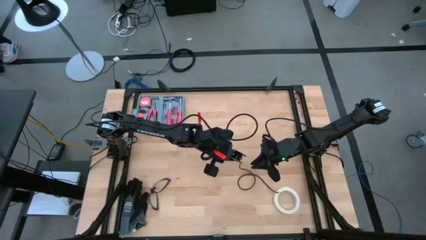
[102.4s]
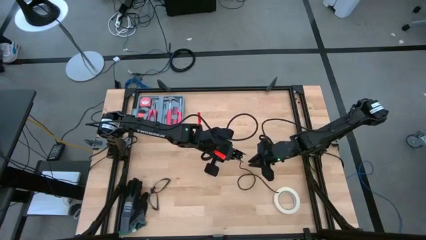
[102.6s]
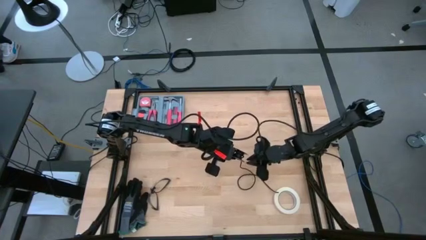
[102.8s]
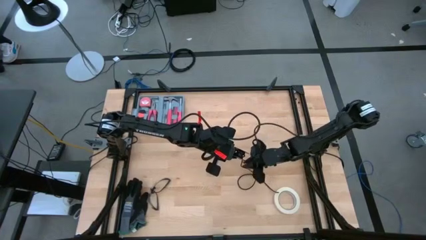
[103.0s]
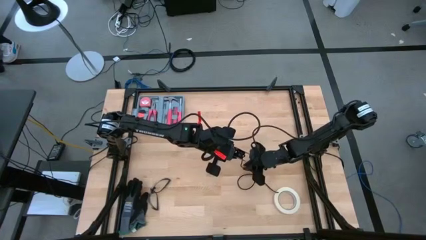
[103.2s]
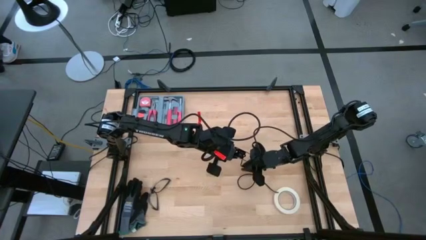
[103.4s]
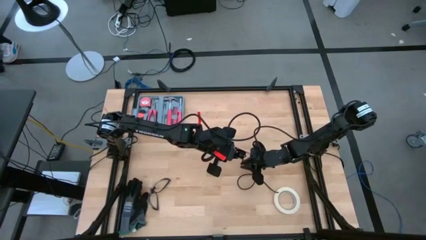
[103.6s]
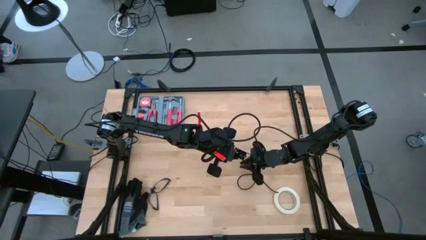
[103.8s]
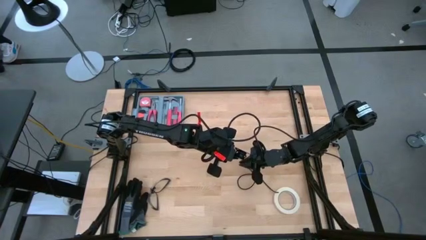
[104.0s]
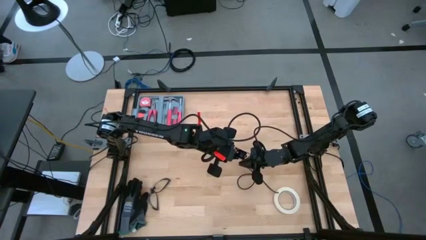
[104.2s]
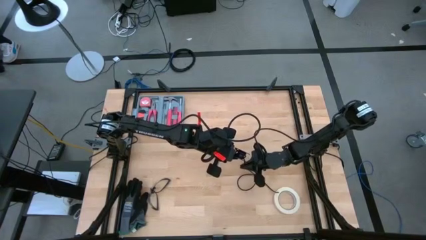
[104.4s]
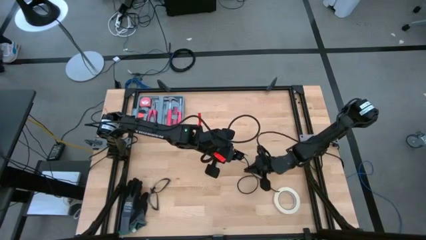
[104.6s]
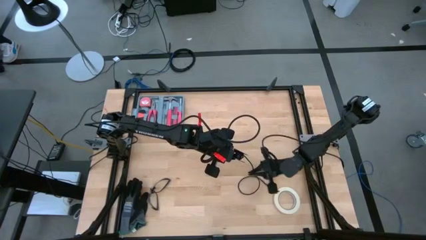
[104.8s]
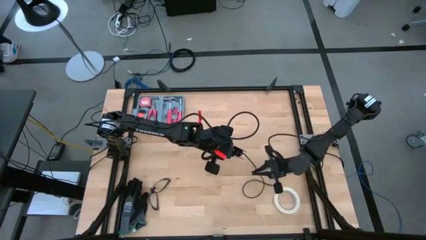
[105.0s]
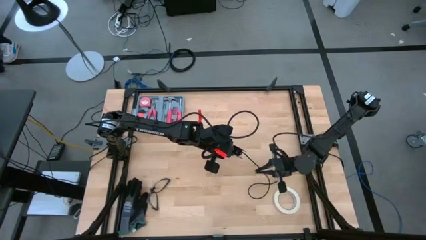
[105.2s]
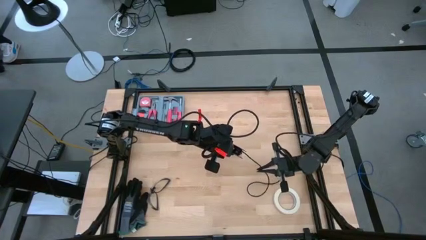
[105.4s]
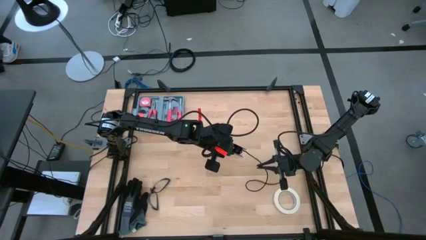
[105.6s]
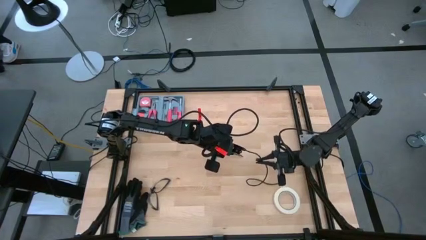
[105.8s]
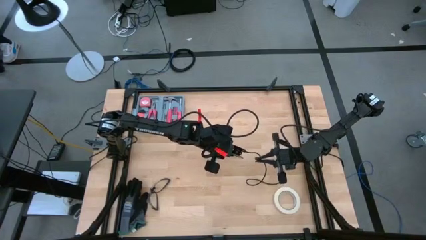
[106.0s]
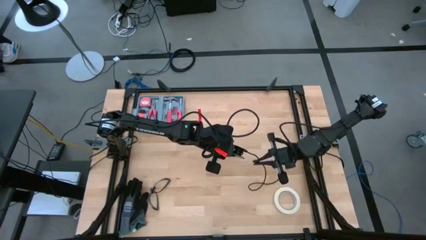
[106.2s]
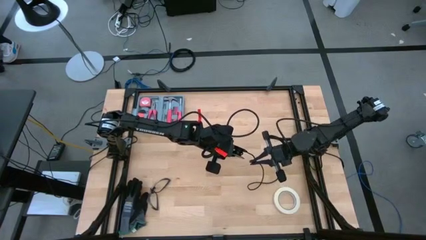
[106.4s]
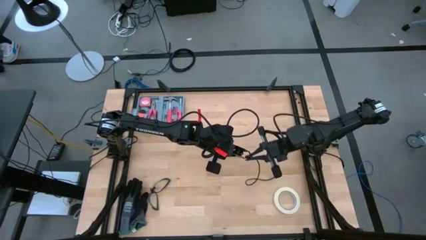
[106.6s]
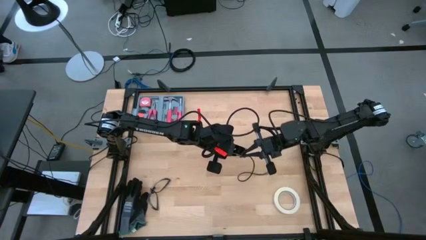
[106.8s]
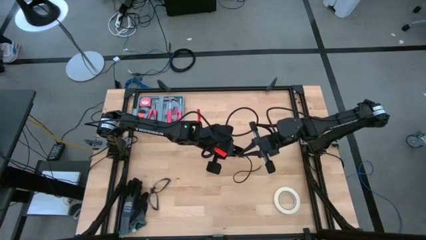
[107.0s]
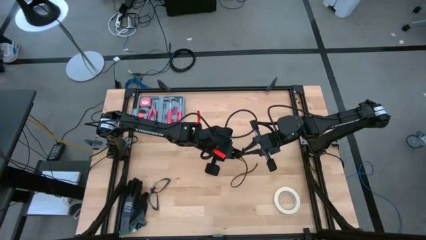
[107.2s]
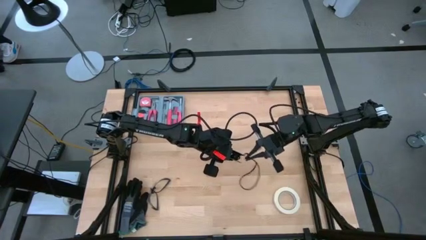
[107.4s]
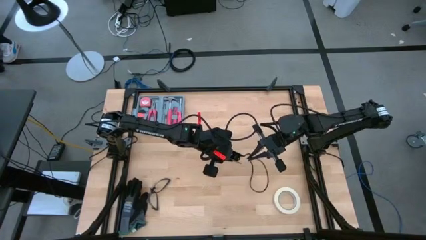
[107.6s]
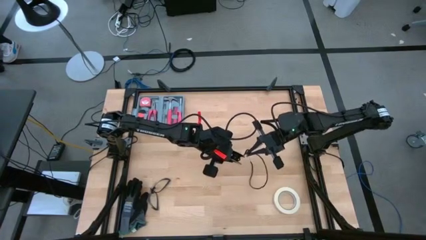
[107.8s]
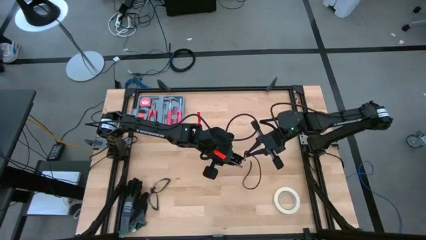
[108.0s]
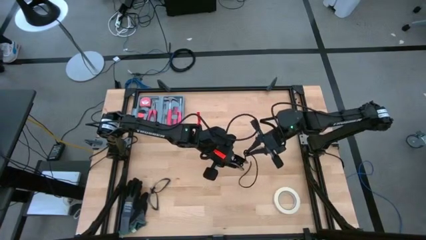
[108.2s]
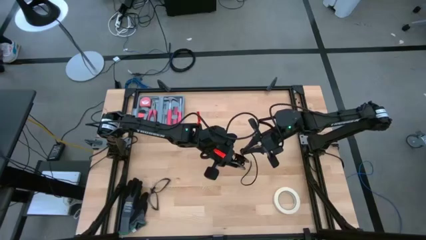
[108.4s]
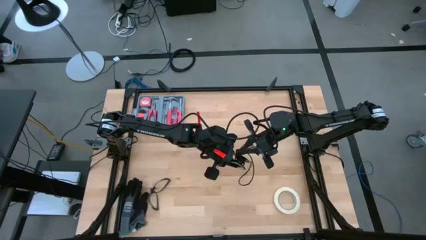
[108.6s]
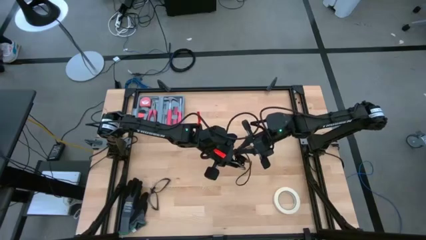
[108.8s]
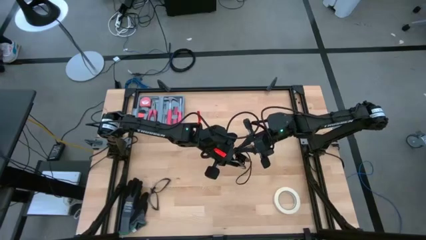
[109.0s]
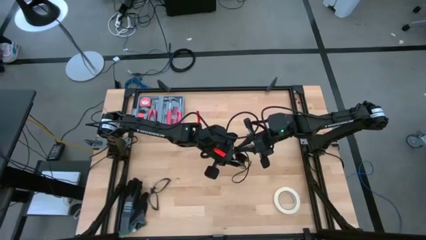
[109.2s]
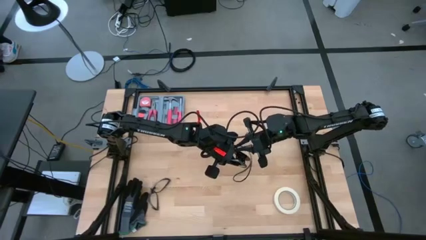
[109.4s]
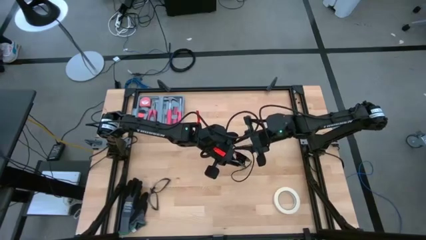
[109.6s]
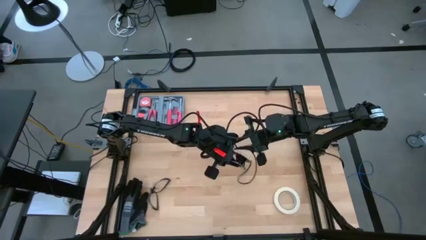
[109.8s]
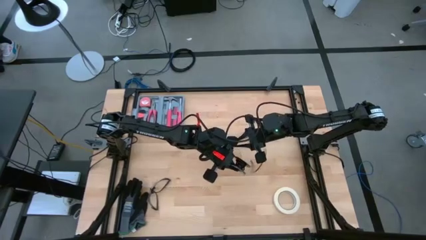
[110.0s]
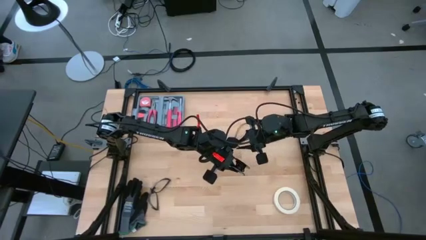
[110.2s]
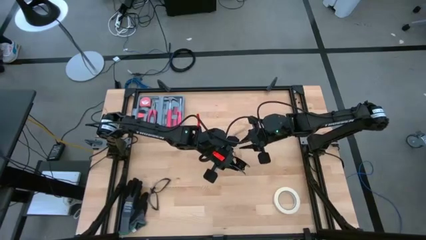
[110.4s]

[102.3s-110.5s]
Task: Coil cords
Coil the black wire onto the spool

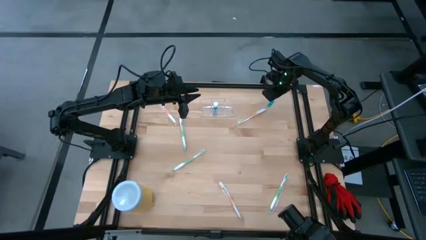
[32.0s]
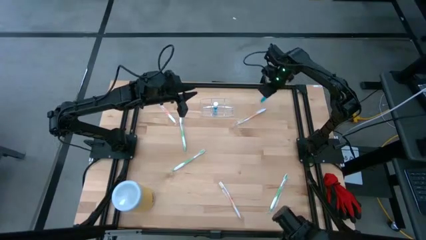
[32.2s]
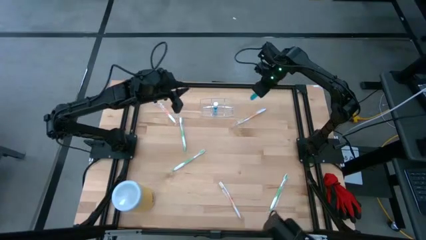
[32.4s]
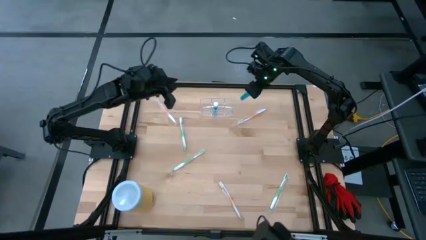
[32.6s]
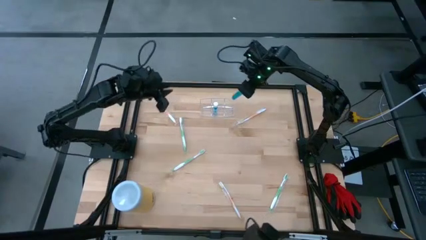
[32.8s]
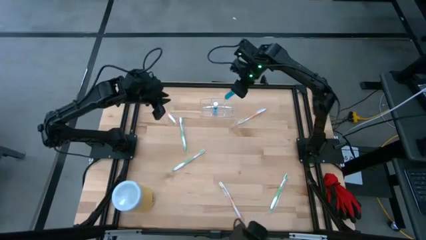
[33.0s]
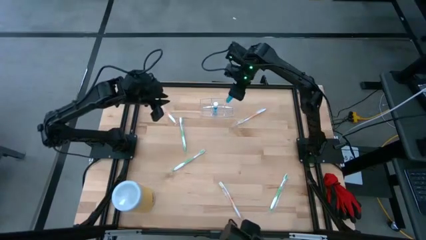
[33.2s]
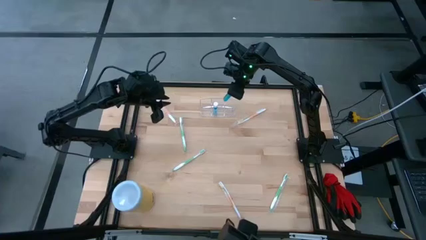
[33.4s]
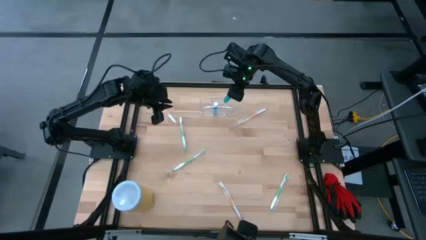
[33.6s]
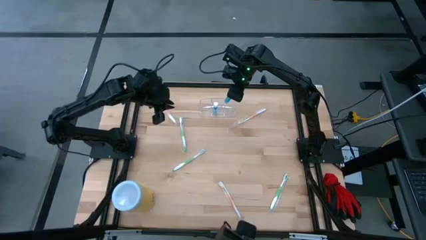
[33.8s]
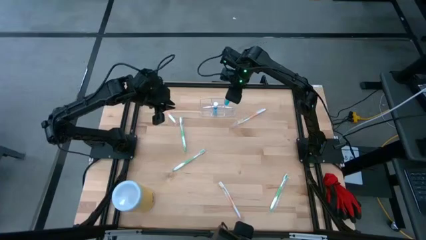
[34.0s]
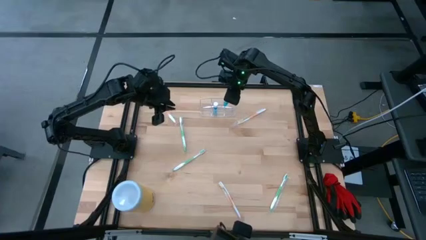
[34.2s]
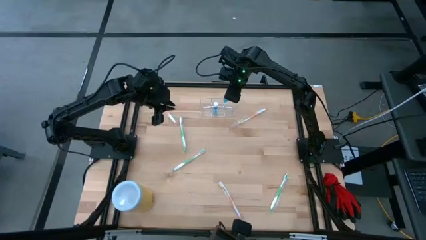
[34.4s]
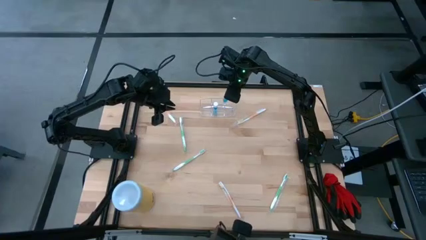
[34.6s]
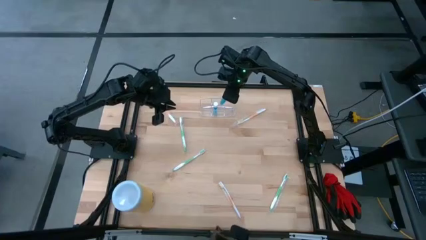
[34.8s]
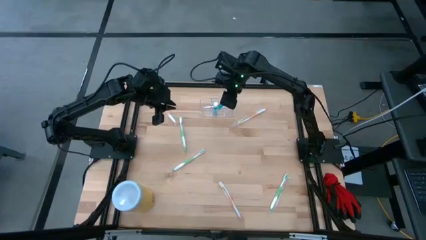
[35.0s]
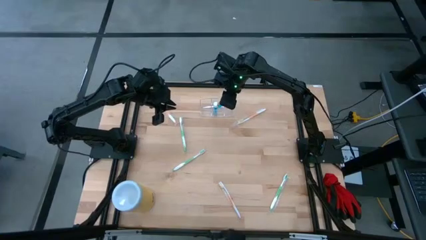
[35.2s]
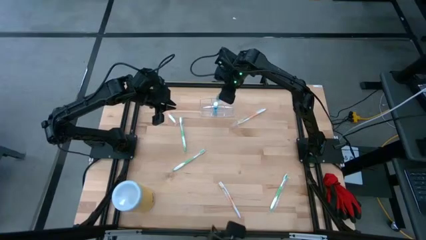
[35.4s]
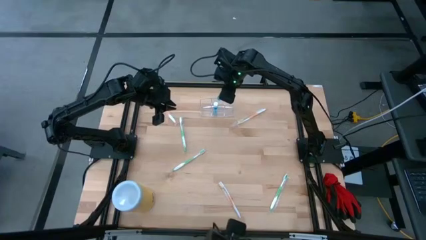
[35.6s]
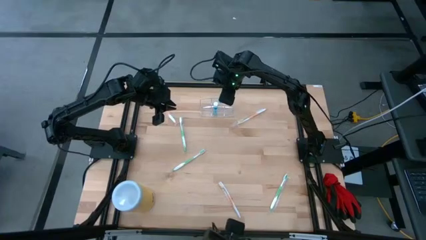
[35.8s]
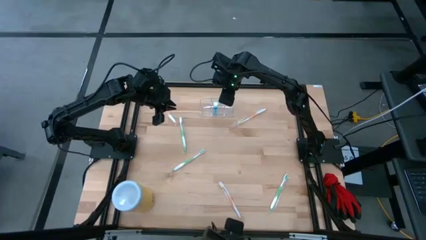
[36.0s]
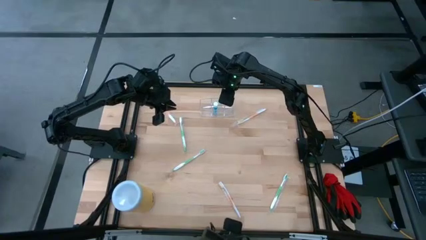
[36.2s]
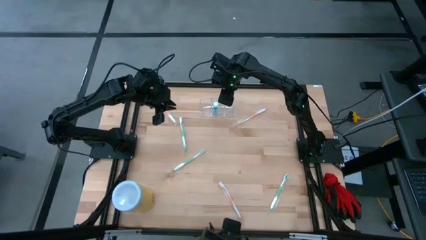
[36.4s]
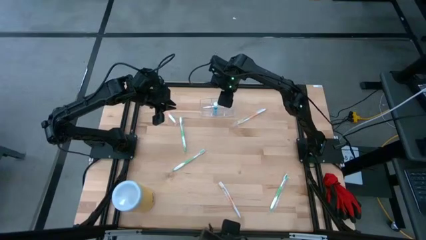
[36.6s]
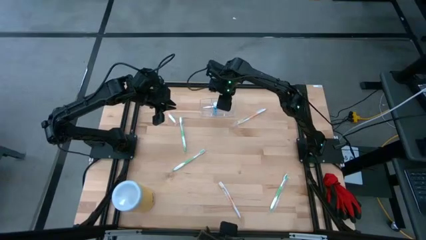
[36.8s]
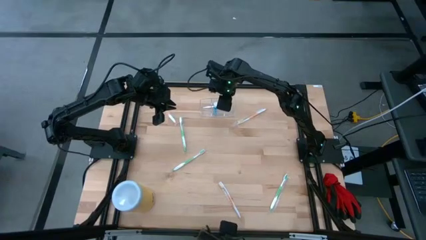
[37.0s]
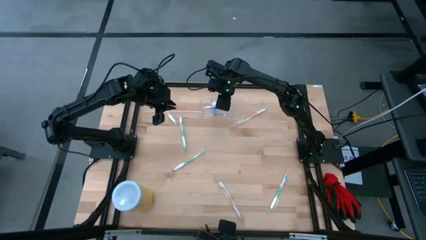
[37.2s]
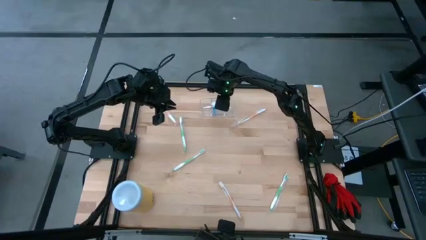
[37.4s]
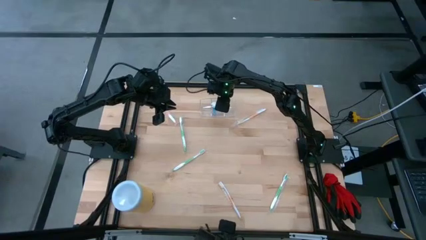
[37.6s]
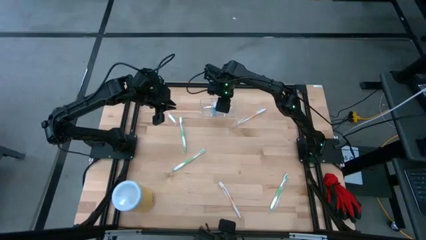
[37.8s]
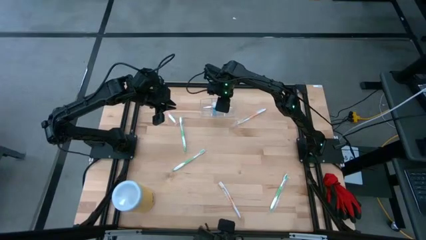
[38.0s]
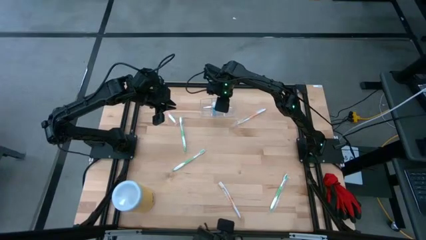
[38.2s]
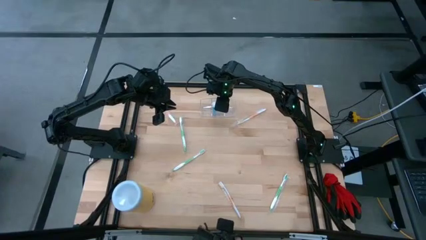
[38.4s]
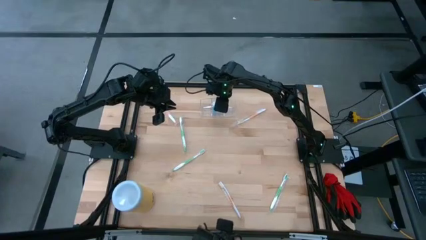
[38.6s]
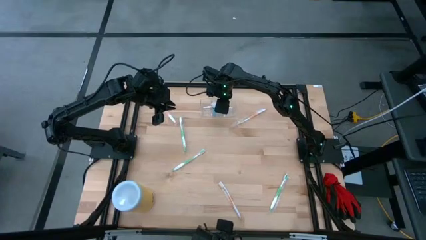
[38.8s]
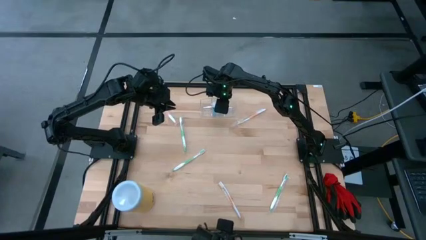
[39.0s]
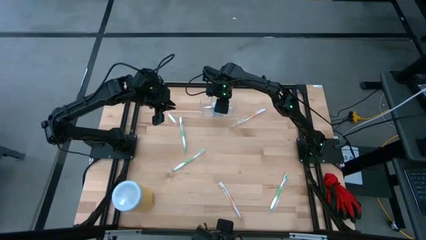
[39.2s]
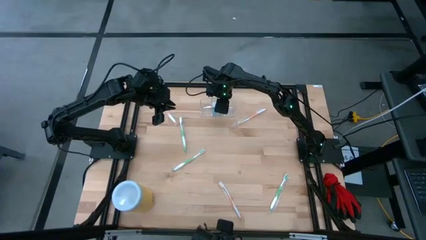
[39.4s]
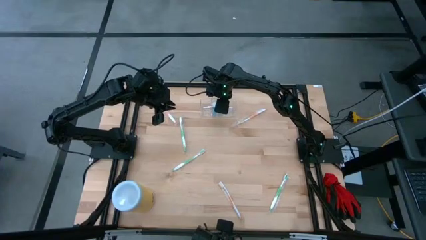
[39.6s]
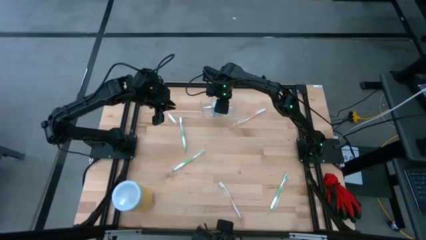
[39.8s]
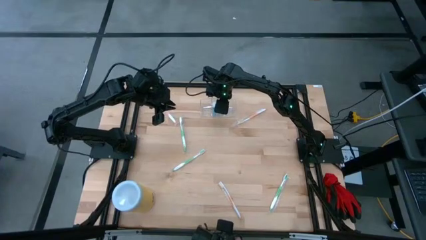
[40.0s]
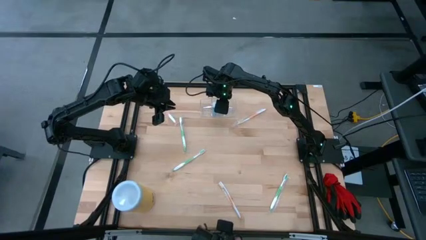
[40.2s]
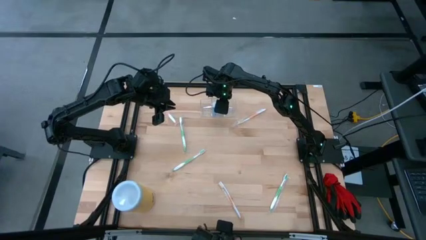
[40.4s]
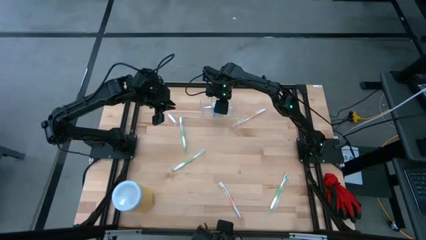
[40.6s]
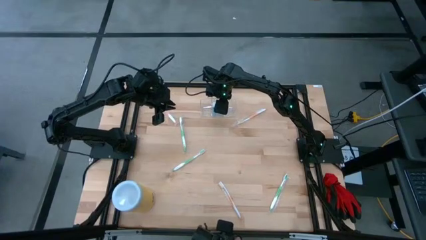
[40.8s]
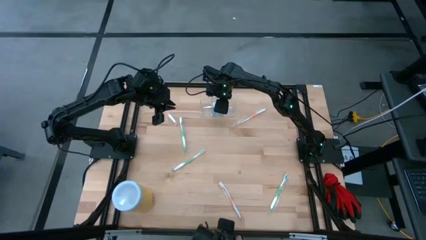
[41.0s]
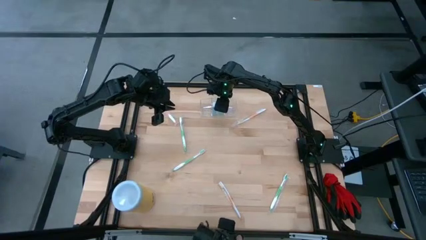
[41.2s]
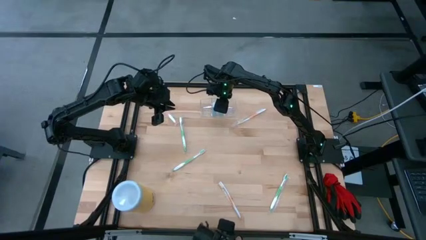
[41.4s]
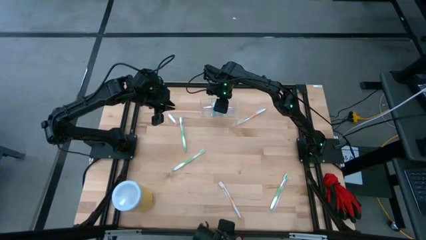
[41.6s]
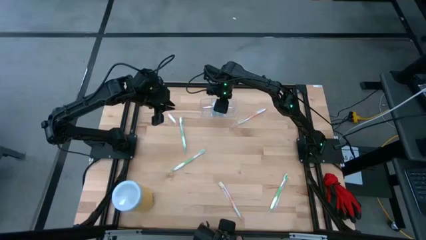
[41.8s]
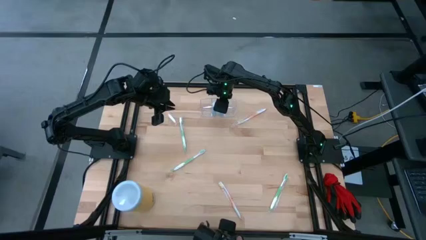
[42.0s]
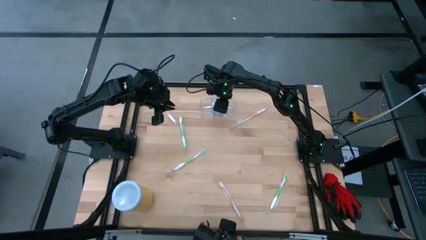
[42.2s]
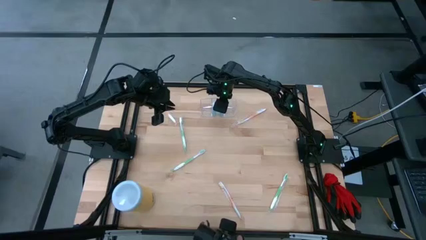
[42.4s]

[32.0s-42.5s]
Task: Pick & Place toothbrushing station
Put the blue mouthwash into the transparent organizer
